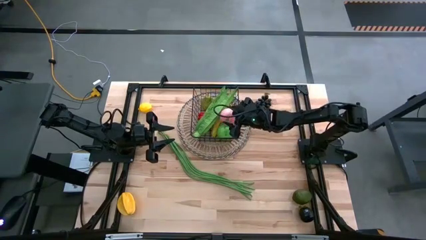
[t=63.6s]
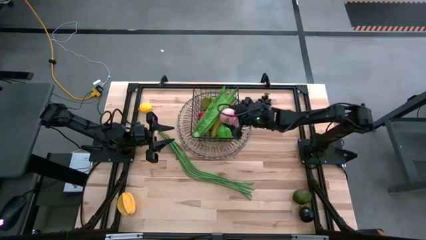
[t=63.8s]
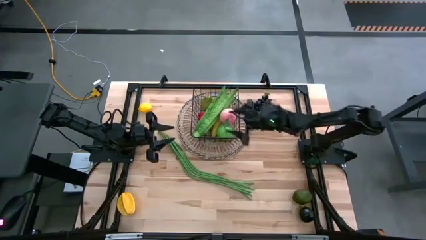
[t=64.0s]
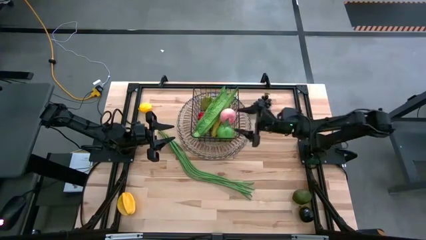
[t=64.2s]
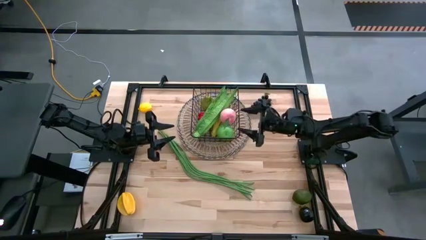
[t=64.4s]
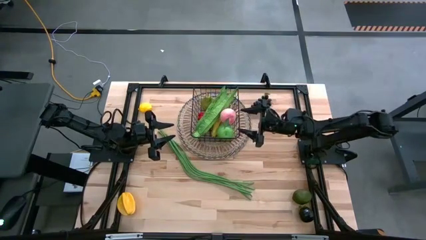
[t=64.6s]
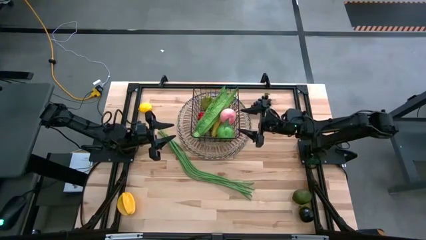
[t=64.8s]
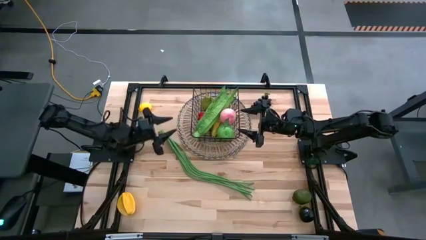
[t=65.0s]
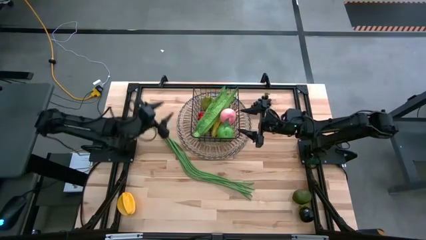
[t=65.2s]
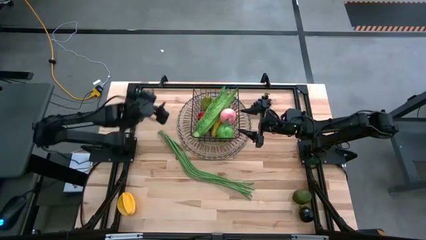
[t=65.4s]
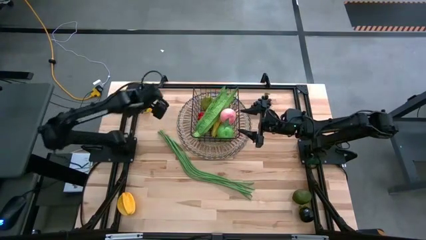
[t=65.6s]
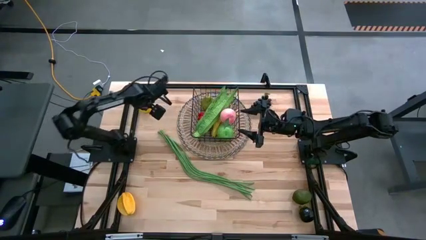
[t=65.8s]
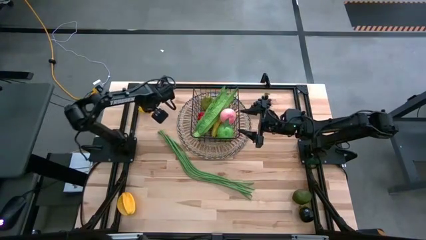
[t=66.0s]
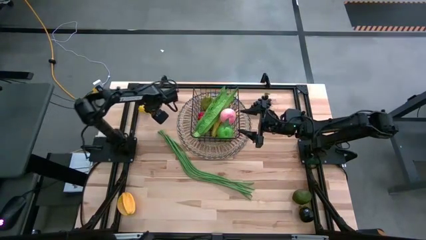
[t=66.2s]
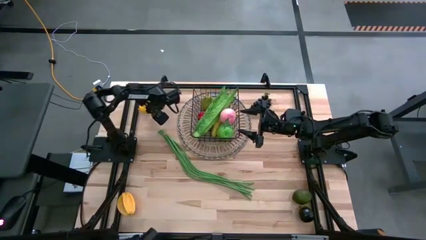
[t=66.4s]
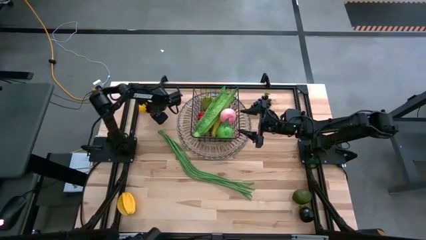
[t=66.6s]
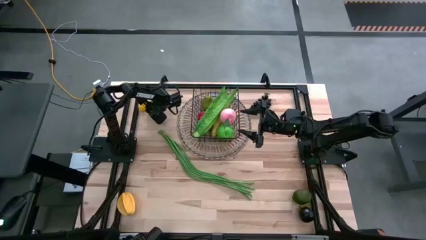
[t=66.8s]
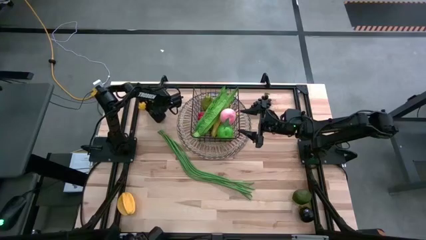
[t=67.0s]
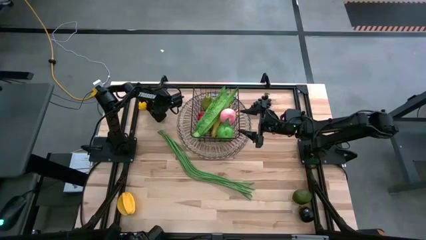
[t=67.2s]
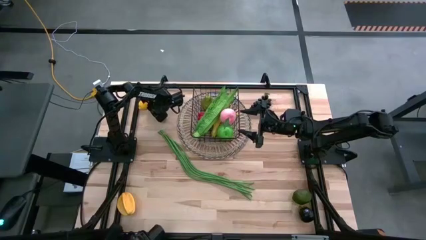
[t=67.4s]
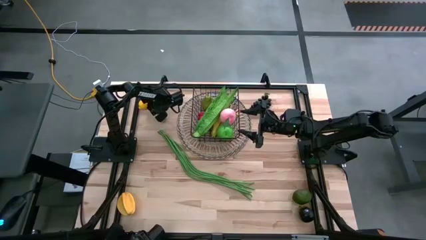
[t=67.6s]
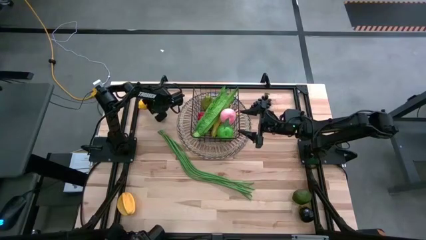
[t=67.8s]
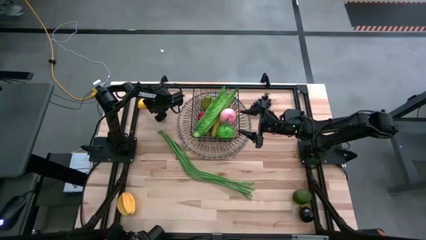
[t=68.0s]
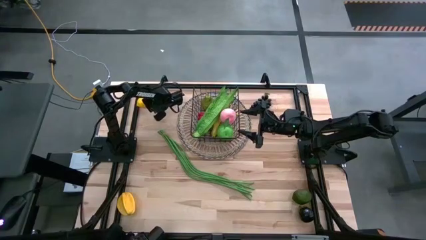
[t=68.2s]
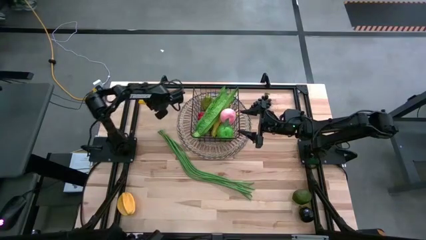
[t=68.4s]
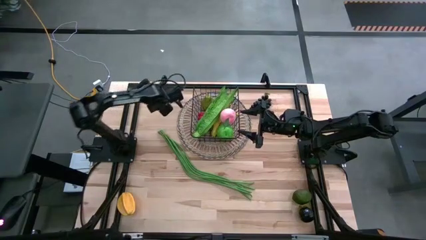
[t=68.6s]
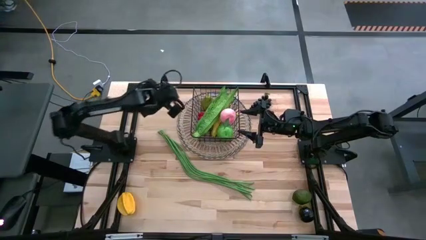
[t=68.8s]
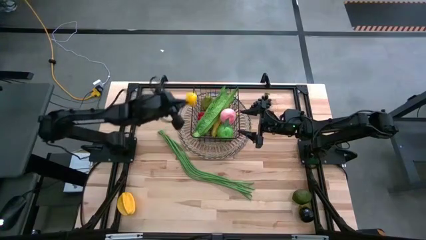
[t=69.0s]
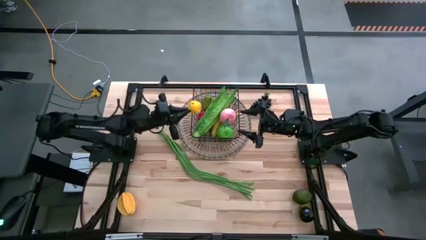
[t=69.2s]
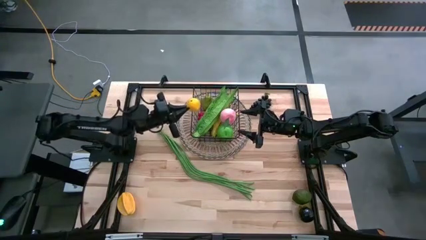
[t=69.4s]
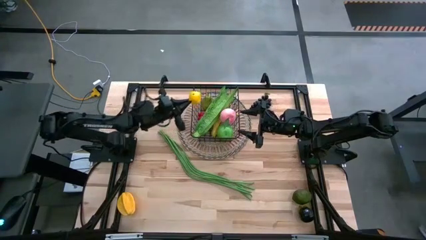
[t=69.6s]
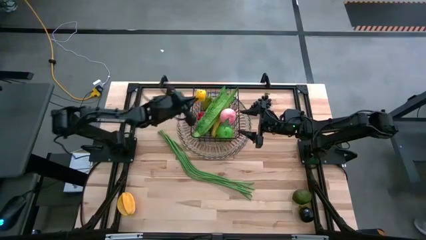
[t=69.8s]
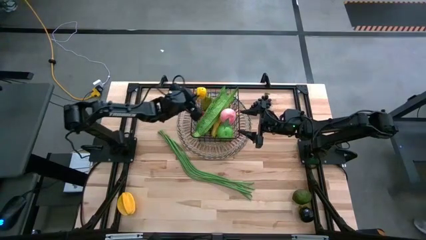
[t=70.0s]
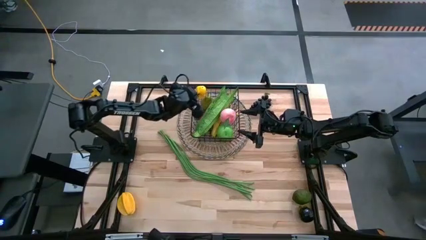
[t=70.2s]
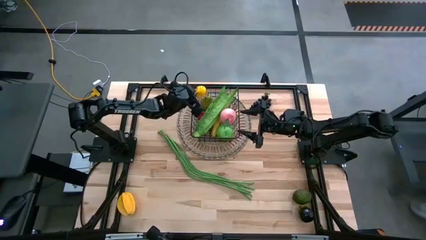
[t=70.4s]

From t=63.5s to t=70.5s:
Task: Build produce basket
Put the yellow lemon into the black mesh basket

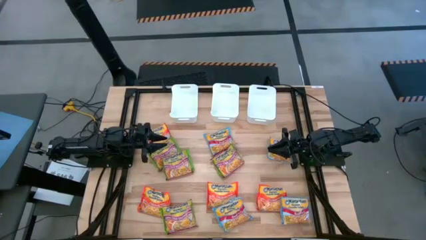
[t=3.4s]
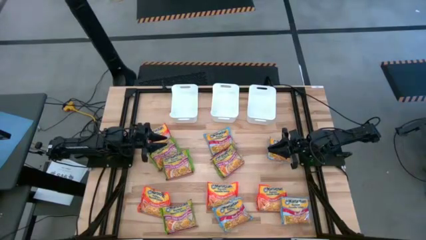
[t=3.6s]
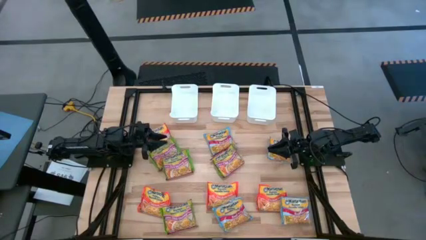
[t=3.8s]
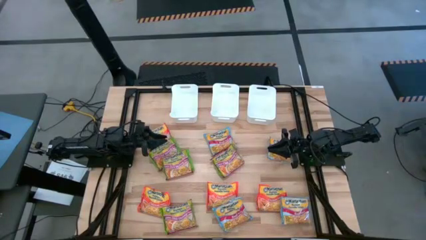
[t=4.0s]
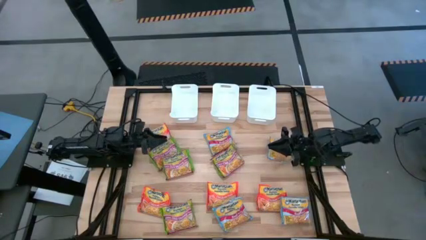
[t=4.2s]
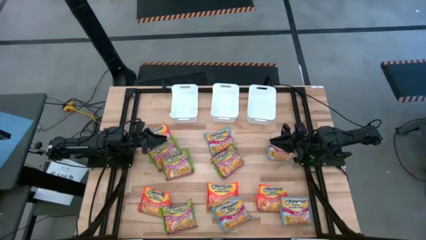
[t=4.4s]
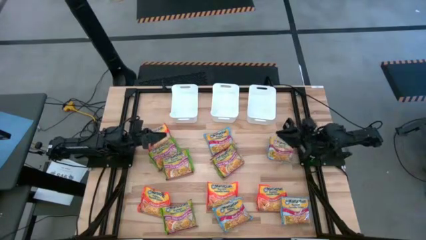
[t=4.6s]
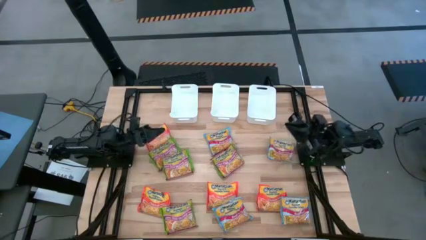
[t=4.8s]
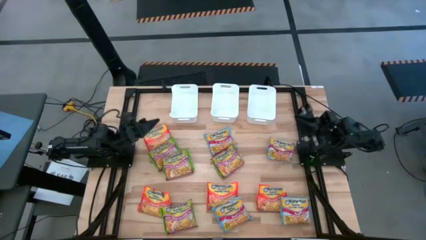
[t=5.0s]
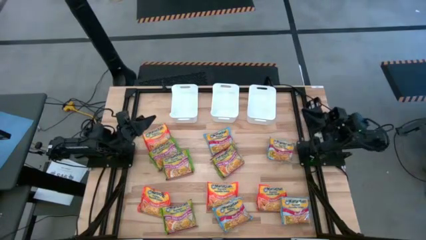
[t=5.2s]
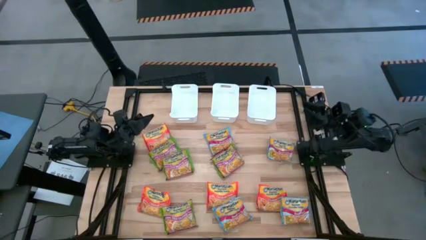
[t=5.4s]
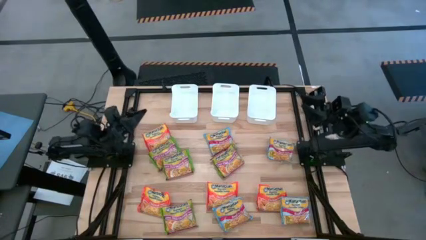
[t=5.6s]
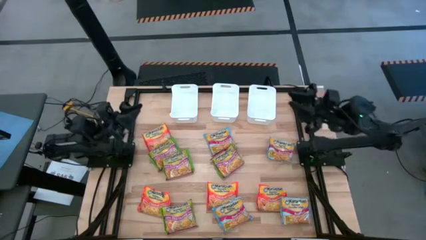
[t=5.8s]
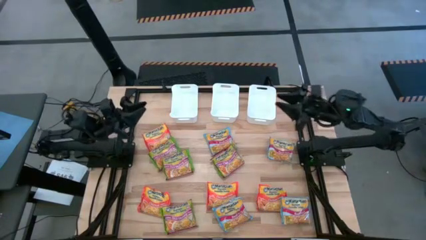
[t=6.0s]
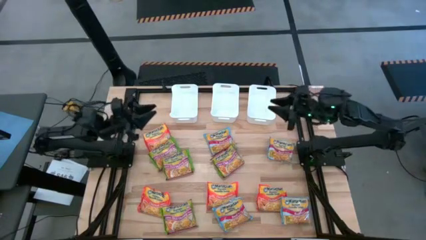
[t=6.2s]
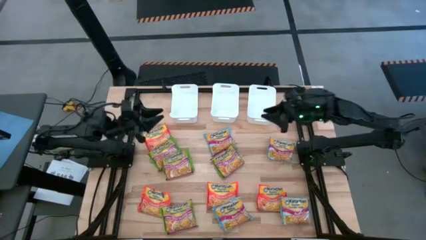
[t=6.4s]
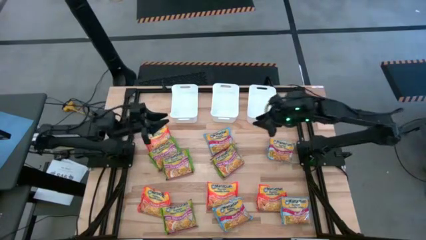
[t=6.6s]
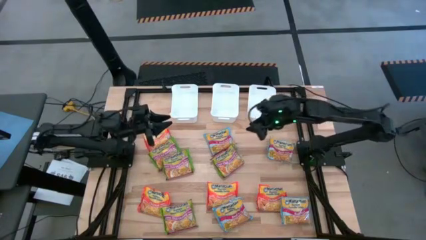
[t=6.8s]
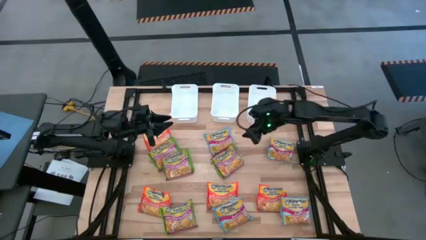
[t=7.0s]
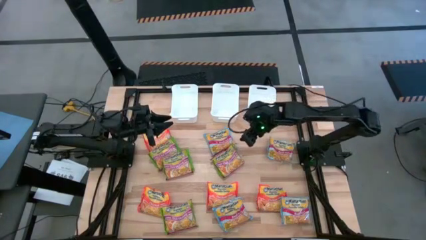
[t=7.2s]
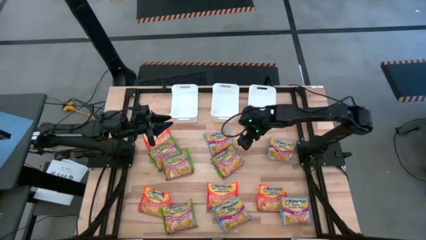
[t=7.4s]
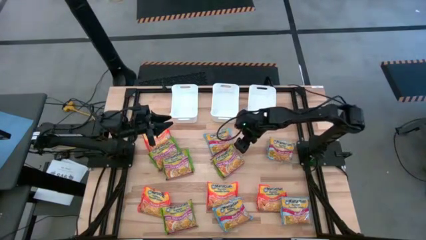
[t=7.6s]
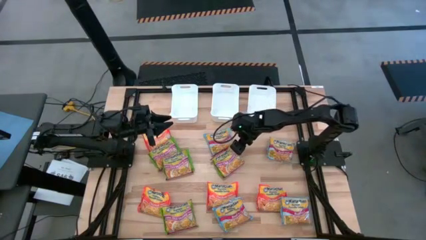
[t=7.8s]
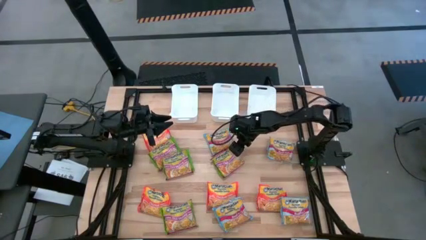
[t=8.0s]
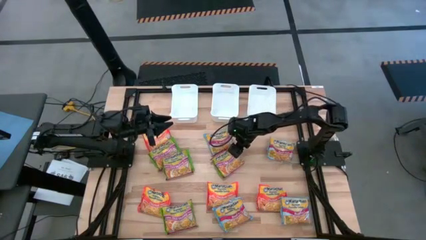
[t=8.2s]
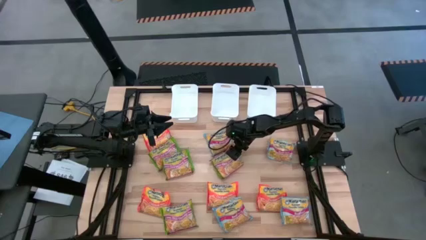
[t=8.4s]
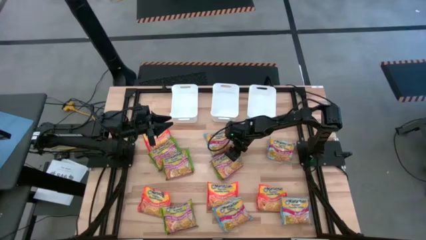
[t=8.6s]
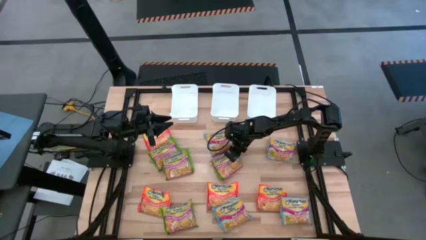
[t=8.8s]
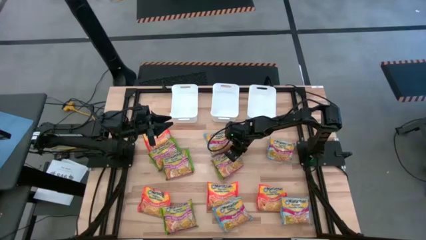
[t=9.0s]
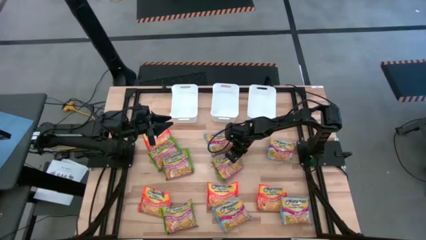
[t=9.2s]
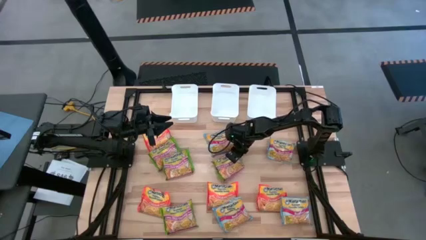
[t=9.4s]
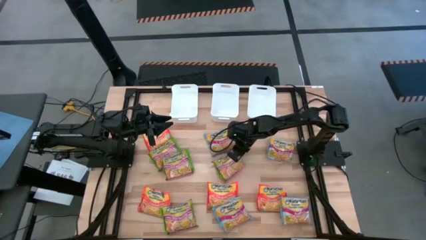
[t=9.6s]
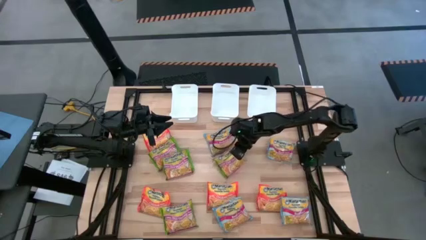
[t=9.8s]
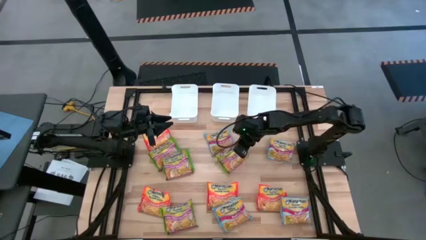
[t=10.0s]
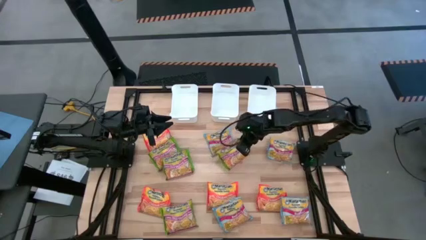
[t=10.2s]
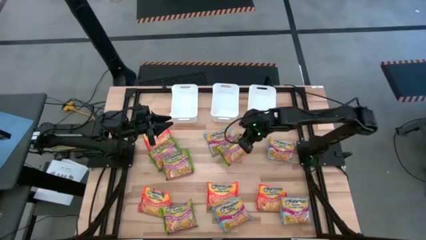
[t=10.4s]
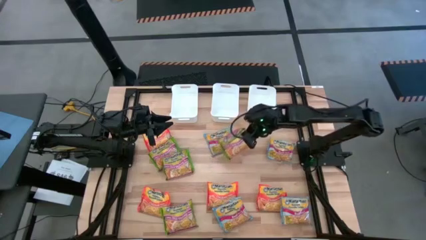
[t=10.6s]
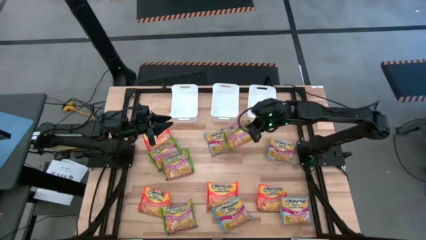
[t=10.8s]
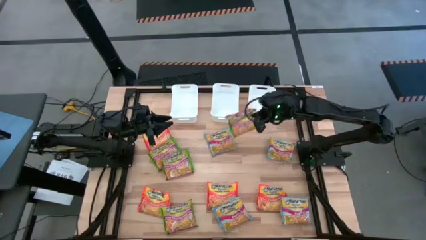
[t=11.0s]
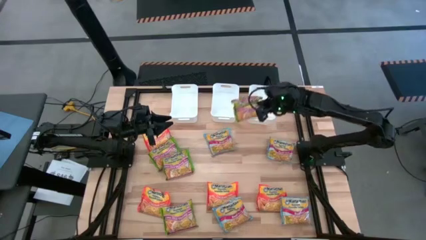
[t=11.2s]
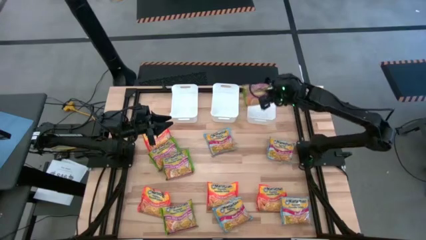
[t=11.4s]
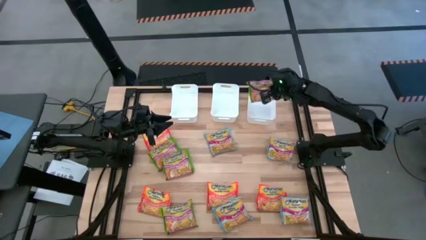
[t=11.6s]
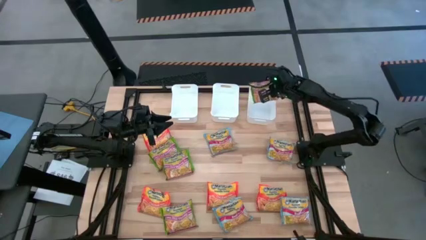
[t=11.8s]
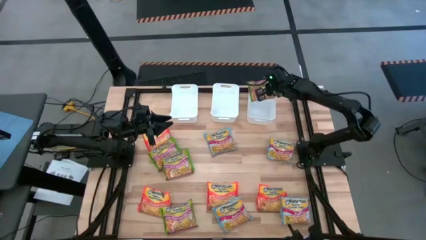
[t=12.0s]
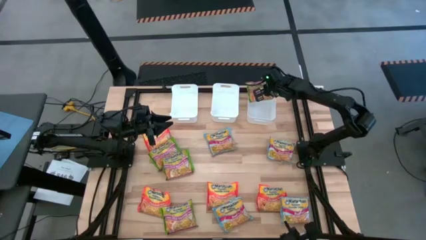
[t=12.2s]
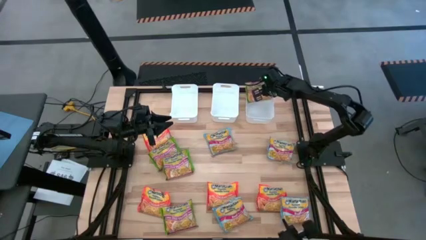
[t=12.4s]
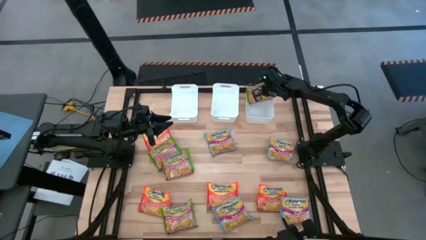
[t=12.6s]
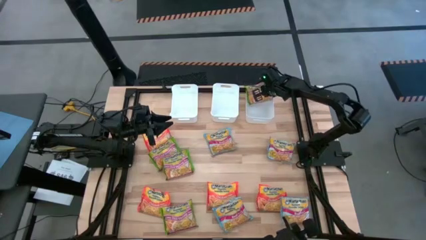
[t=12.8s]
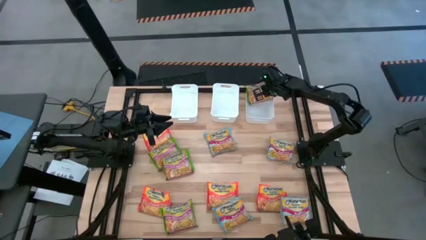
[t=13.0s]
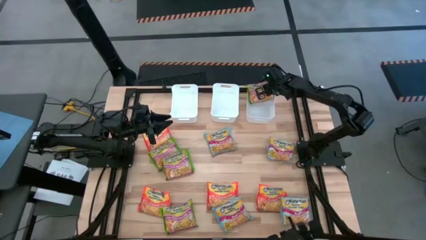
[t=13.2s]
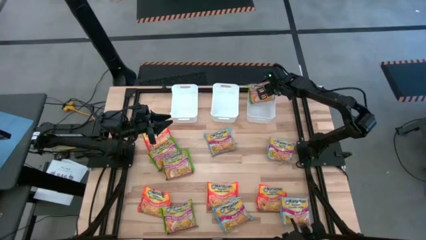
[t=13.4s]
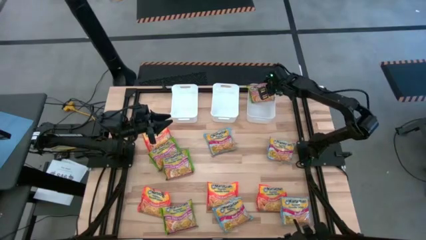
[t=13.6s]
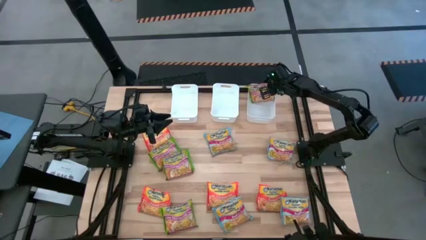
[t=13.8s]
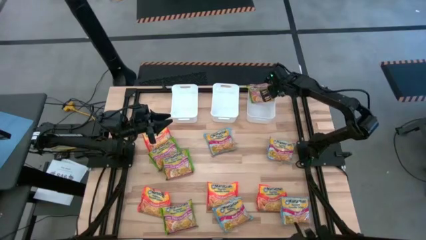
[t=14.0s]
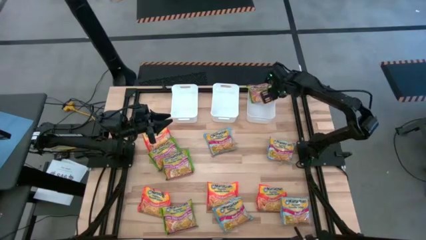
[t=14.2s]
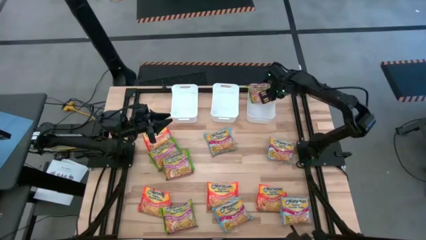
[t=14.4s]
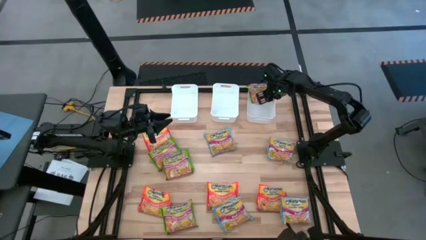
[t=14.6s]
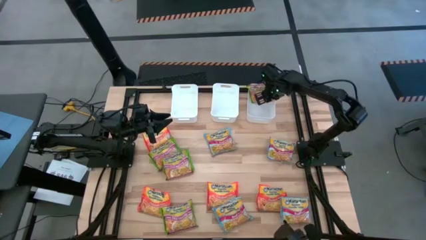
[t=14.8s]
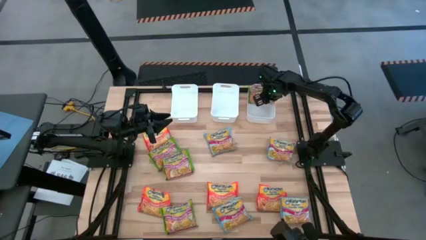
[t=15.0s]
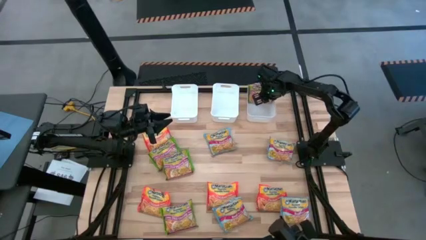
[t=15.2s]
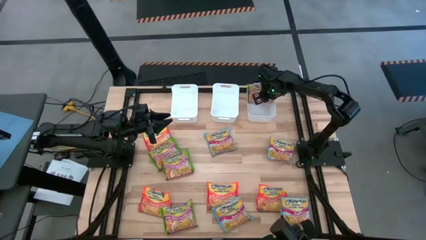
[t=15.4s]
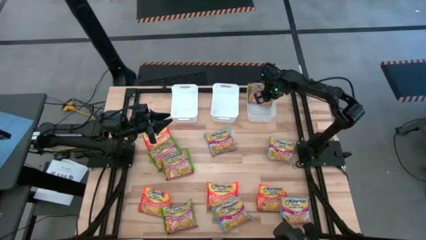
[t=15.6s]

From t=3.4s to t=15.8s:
Task: Sort Maruchan noodles
Put the green noodle pack into the right white bin
